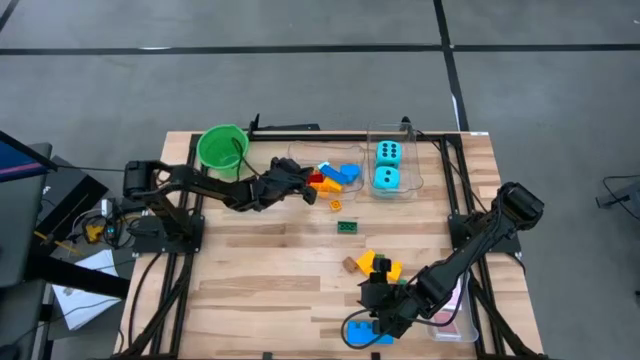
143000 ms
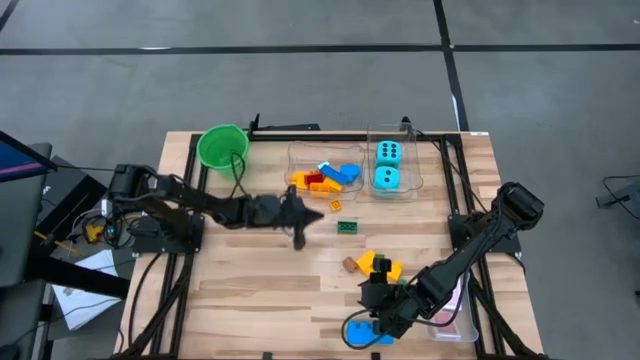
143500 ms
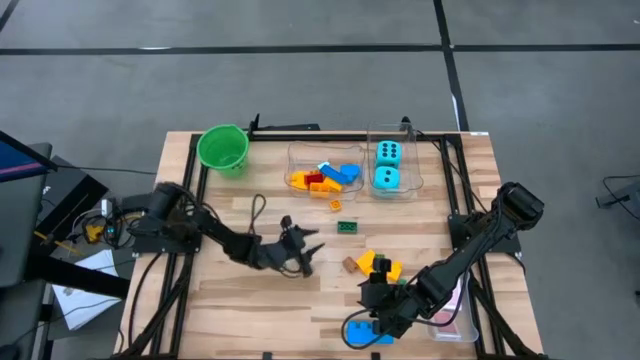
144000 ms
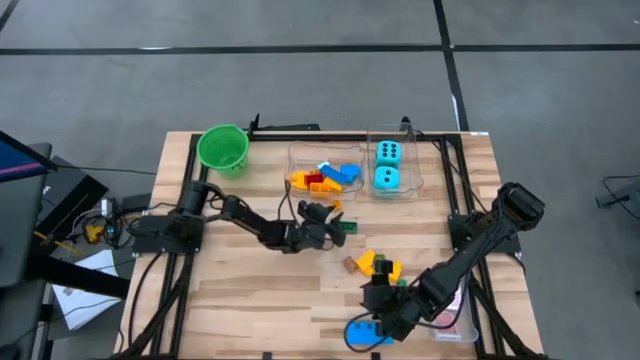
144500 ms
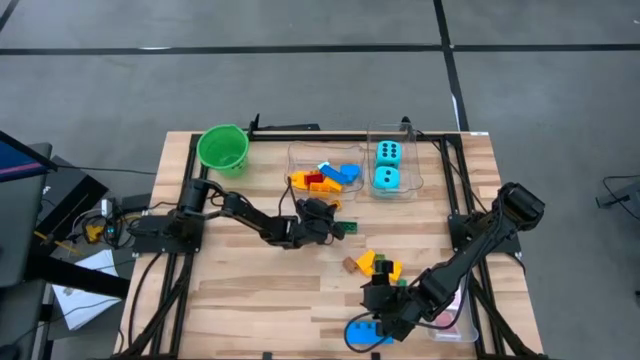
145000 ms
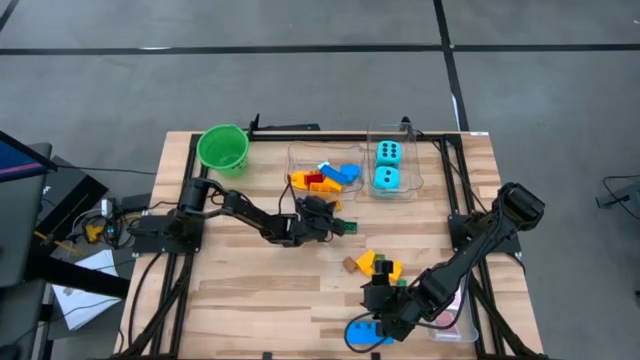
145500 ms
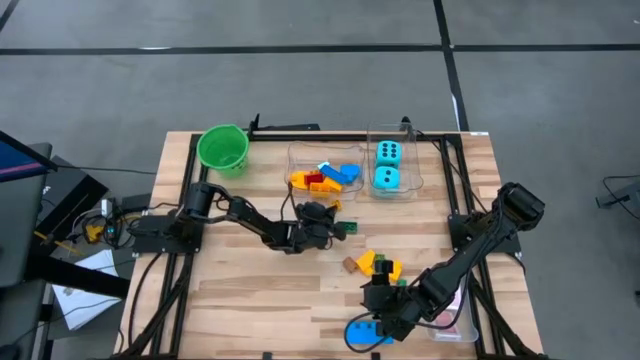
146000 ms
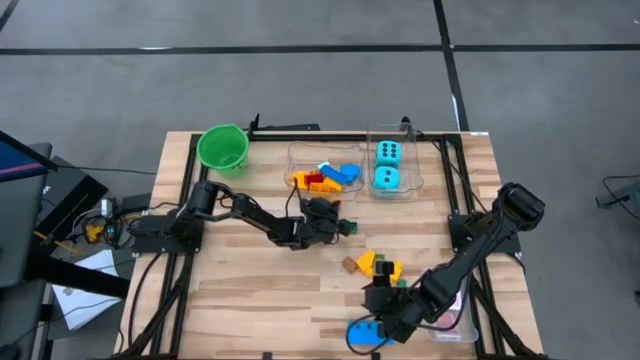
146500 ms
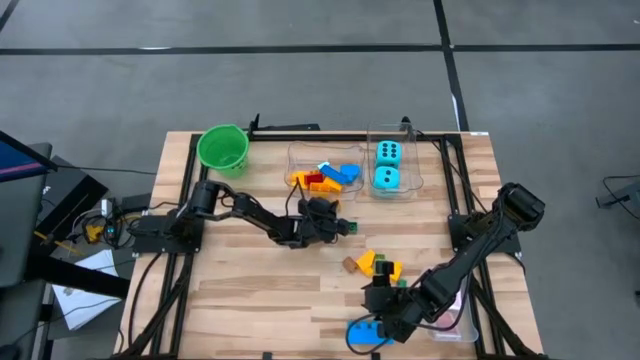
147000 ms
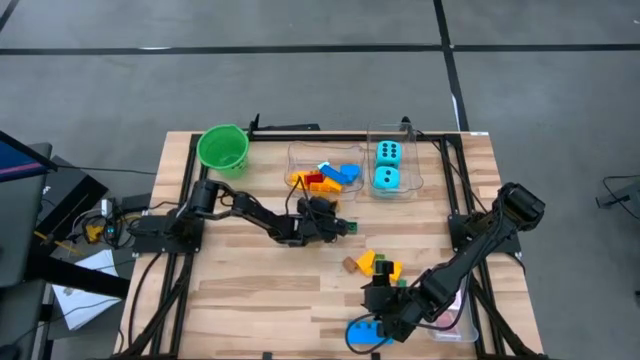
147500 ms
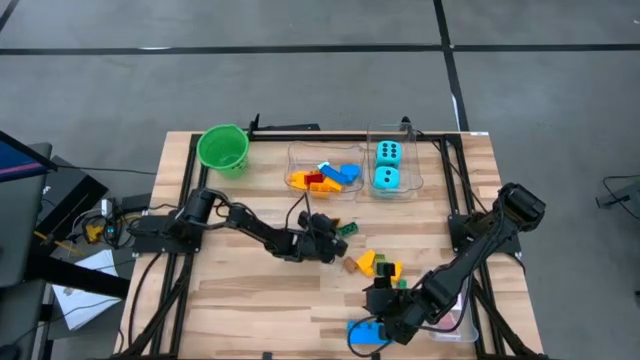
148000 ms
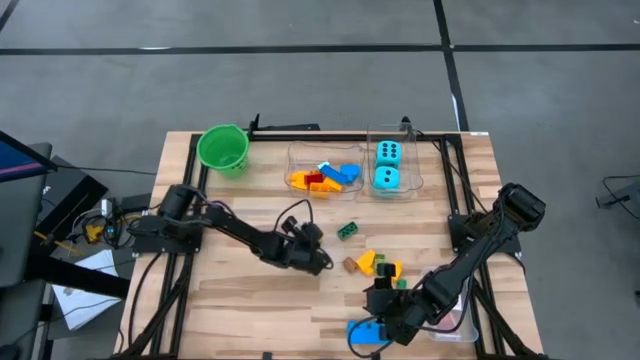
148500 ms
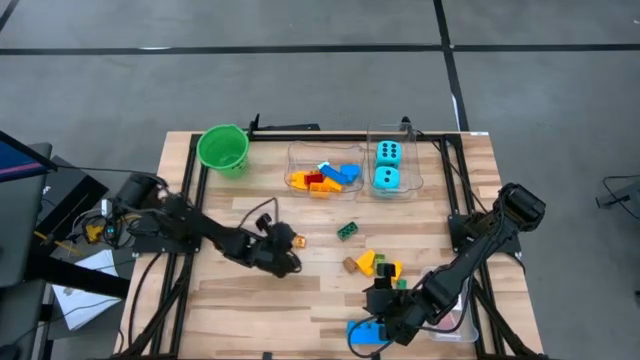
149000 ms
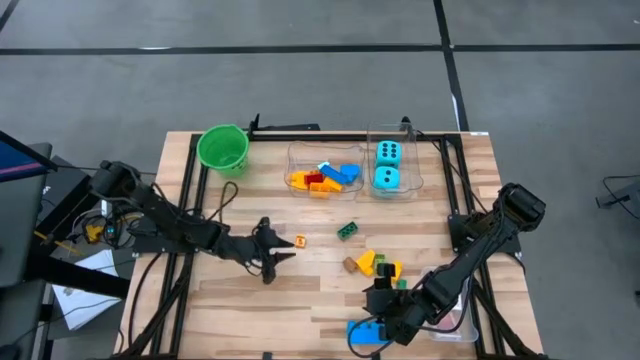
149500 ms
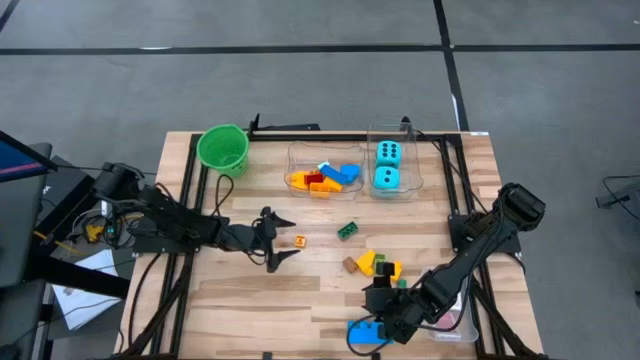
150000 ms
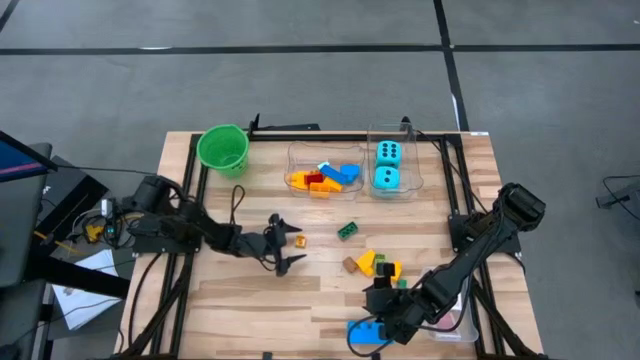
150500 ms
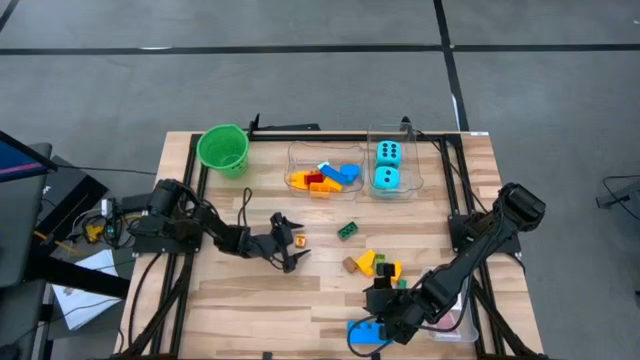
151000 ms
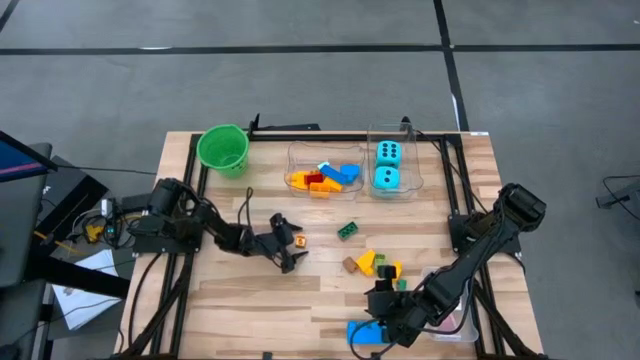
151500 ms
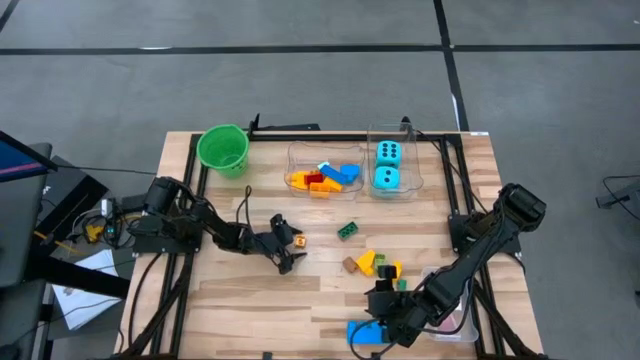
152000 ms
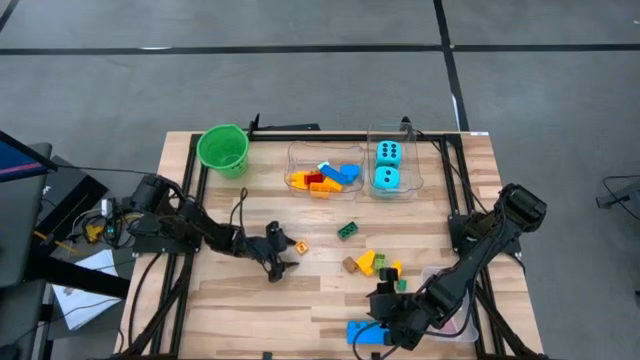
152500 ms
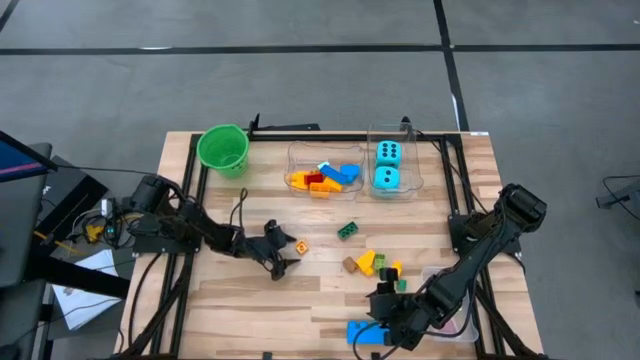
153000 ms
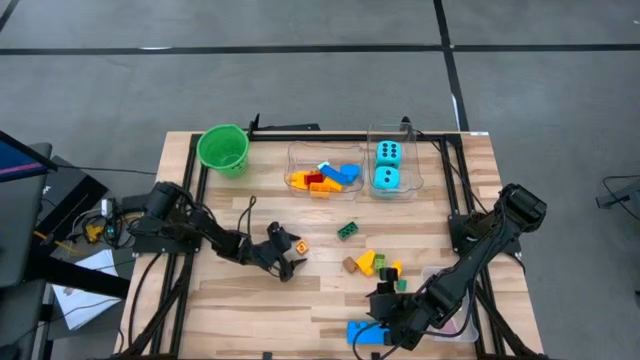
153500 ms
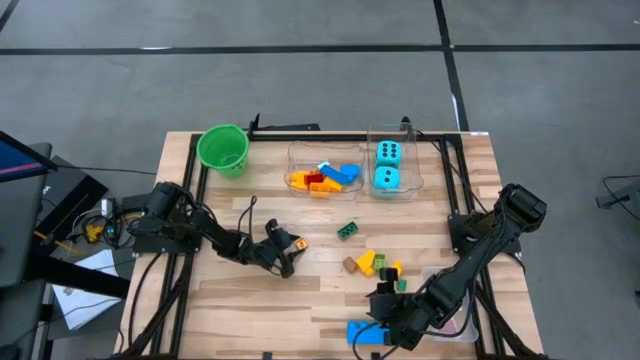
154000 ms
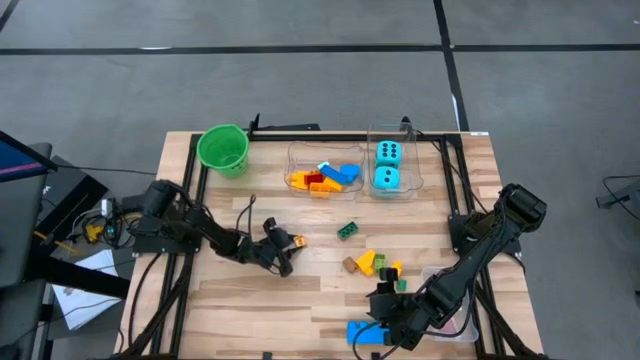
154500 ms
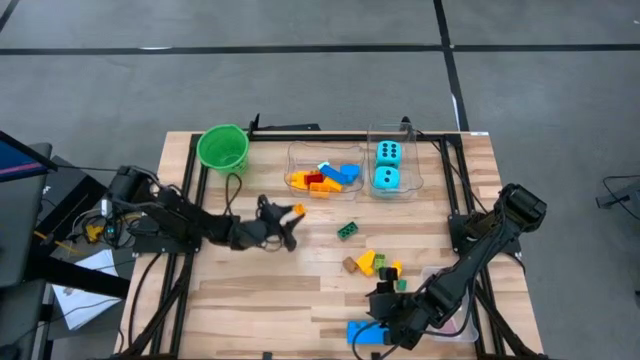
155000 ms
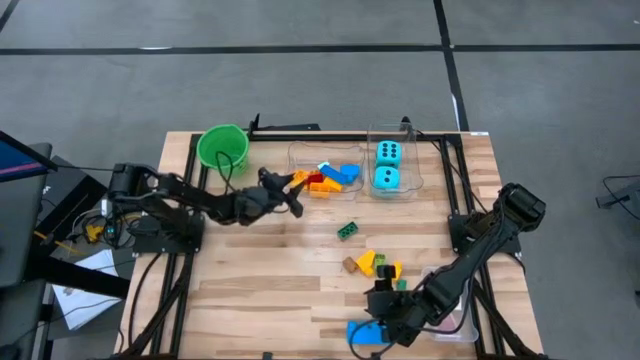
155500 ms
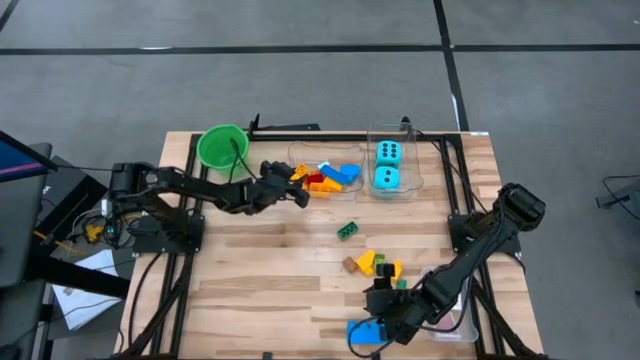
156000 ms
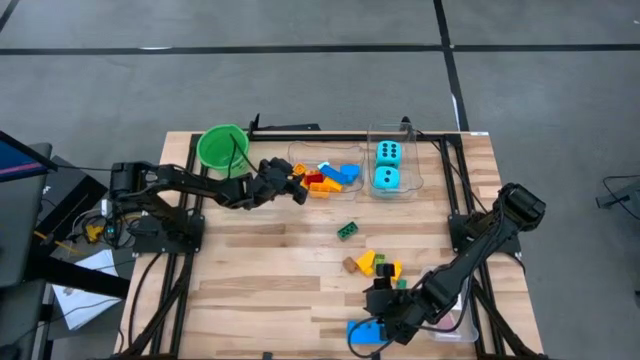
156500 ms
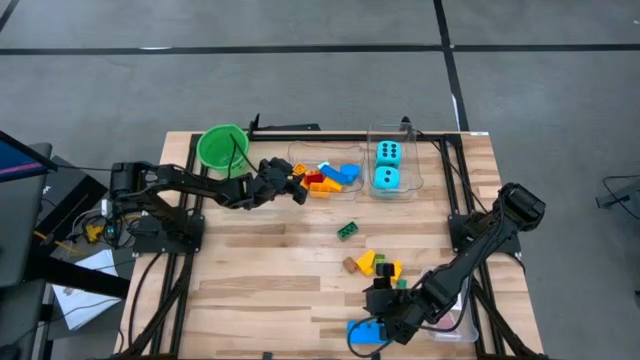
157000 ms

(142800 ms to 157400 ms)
Task: Pick & Place Toys
Put the yellow gamepiece into the left transparent bin

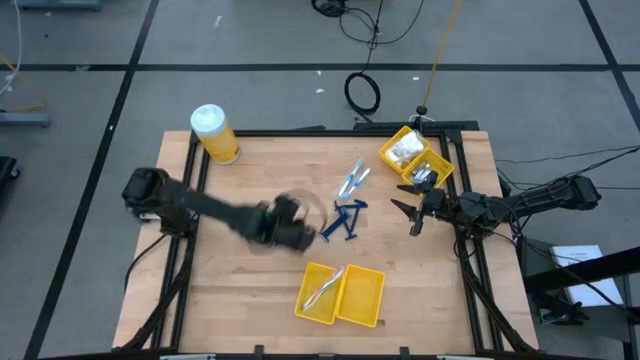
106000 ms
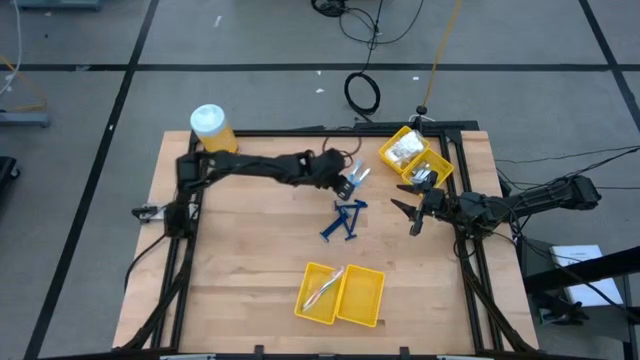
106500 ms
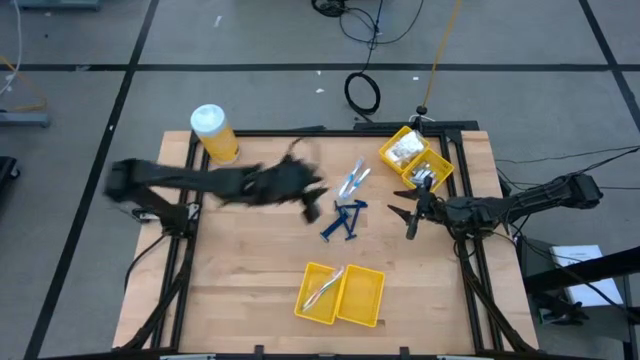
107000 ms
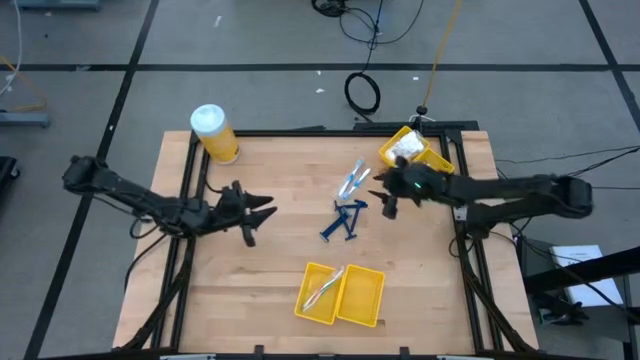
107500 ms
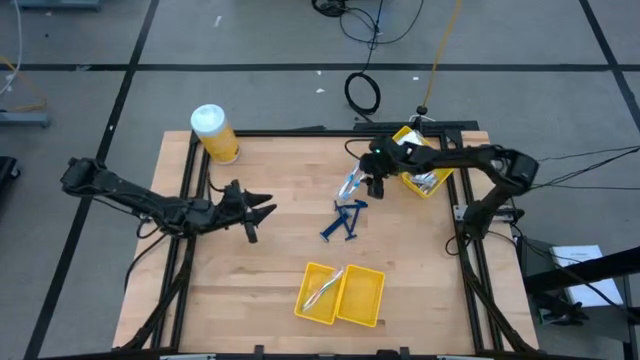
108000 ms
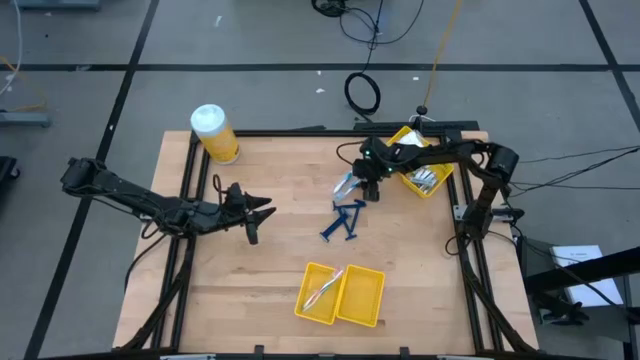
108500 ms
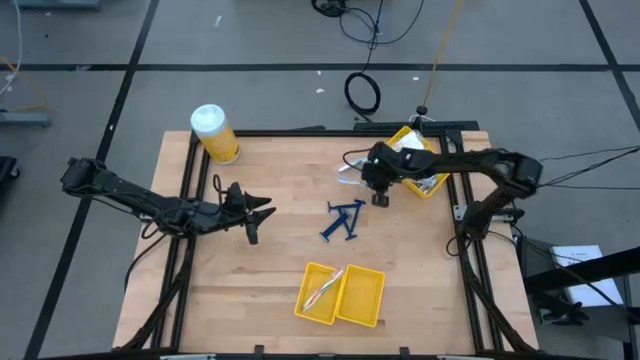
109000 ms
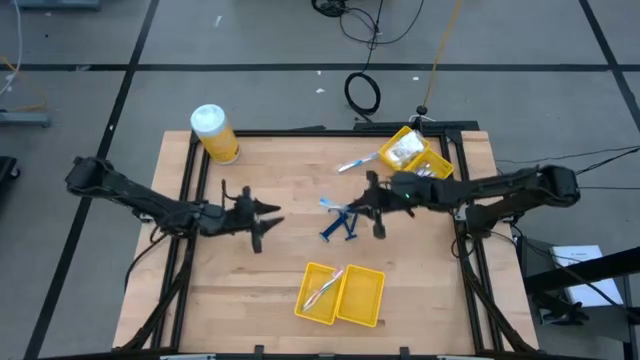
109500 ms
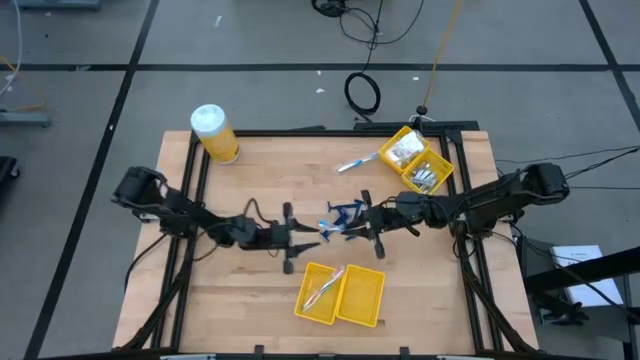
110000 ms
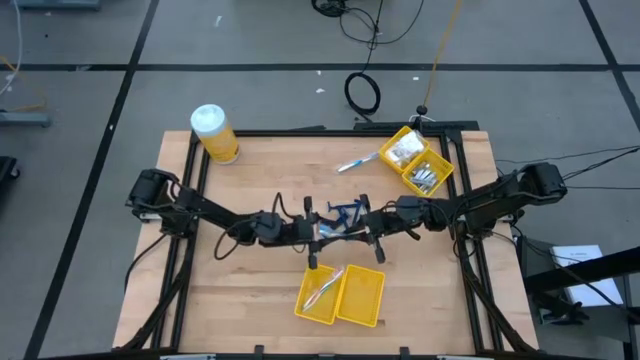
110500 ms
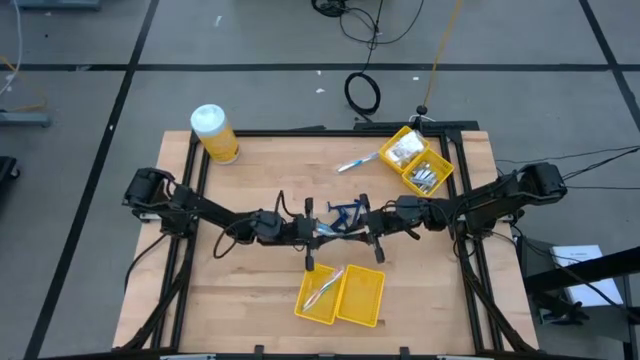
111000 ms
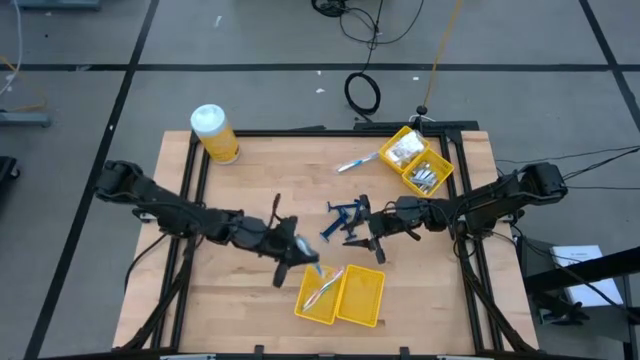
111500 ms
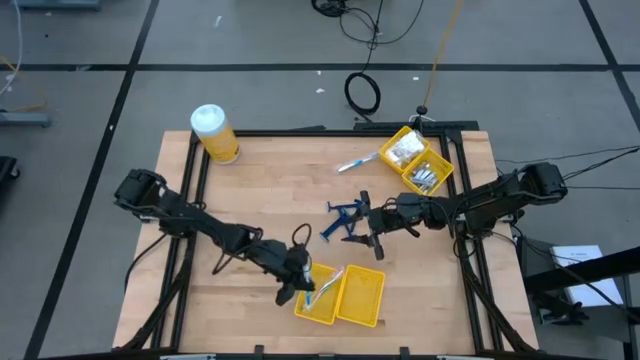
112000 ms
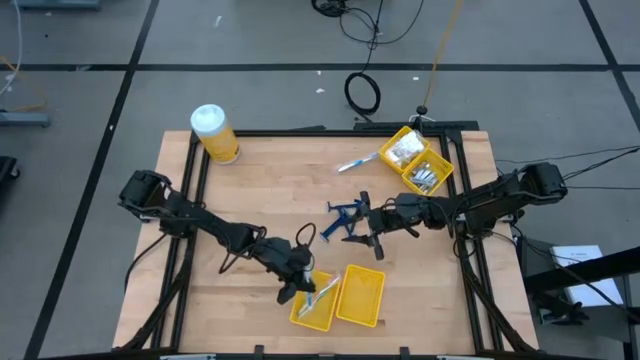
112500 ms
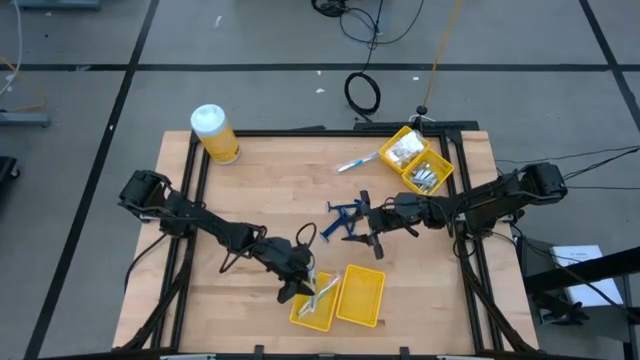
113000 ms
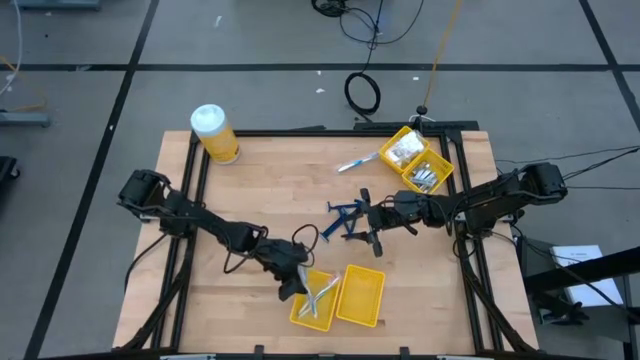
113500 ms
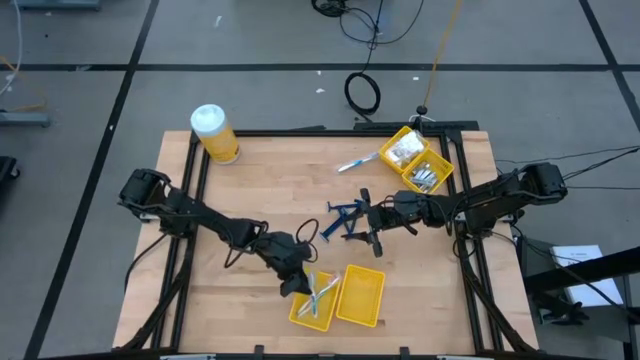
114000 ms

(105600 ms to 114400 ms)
Task: Pick & Place Travel size toiletries
Put the right white and blue toothbrush into the bottom left yellow bin
